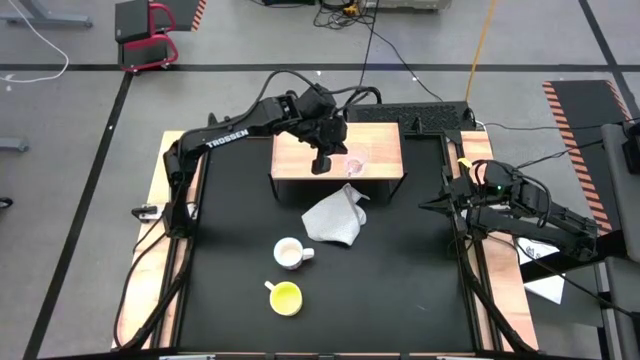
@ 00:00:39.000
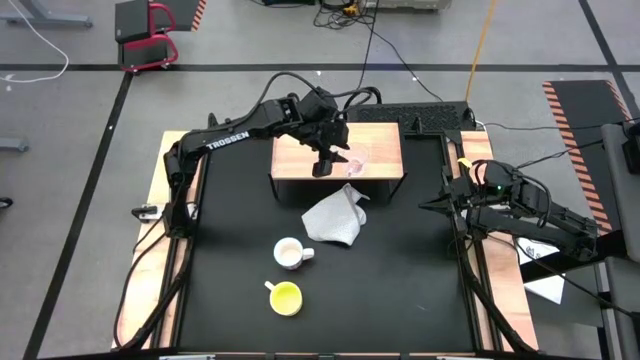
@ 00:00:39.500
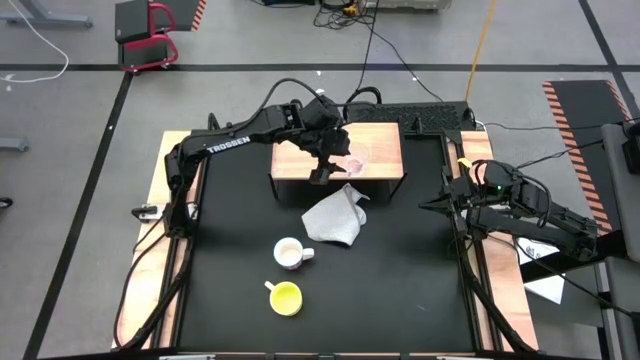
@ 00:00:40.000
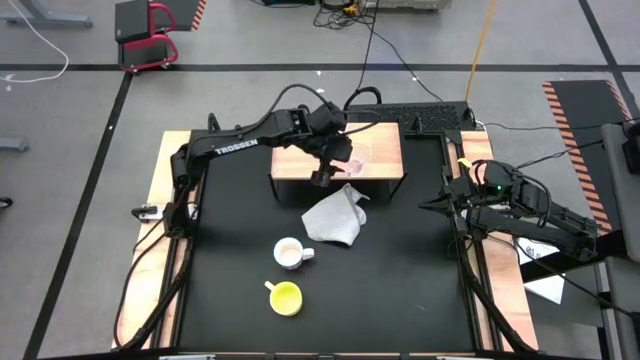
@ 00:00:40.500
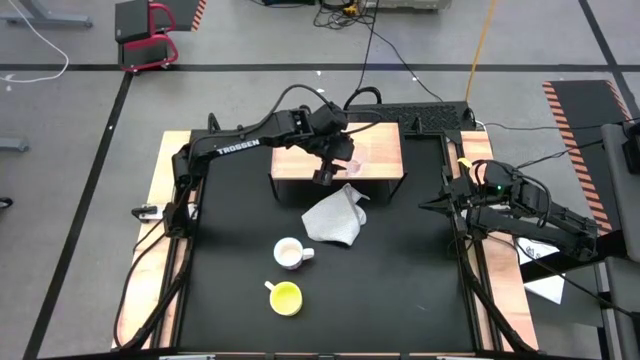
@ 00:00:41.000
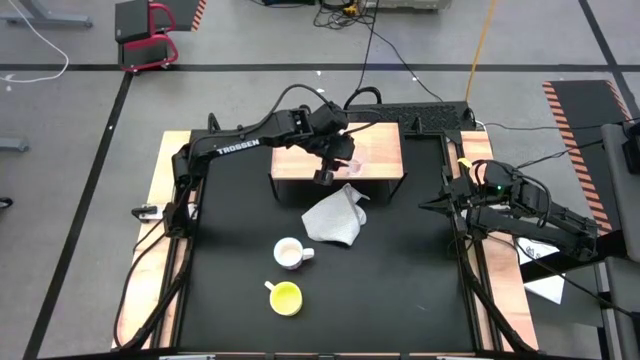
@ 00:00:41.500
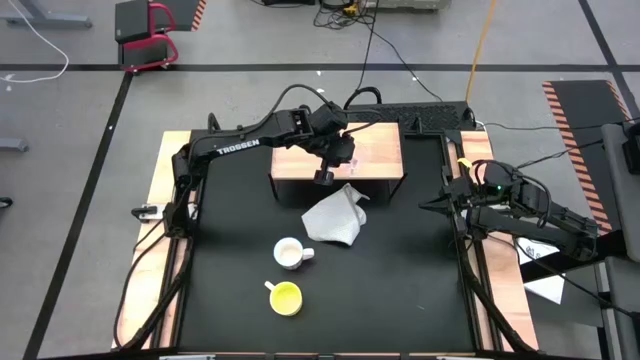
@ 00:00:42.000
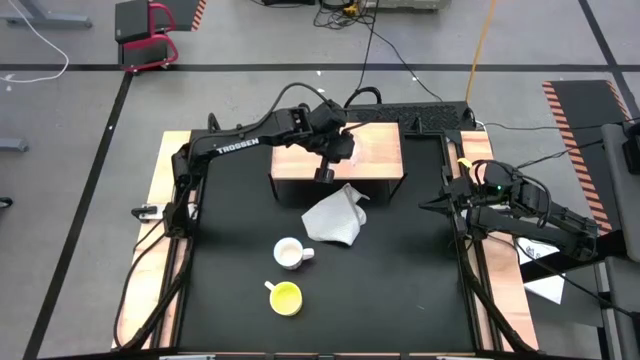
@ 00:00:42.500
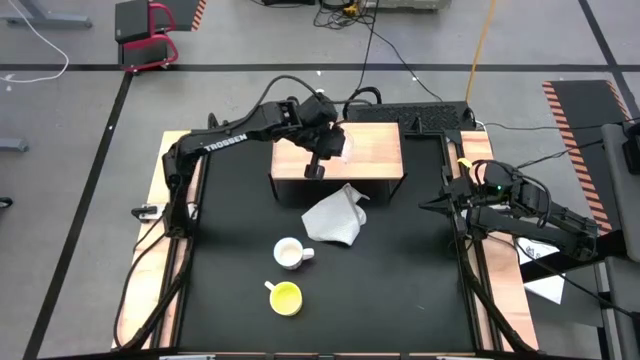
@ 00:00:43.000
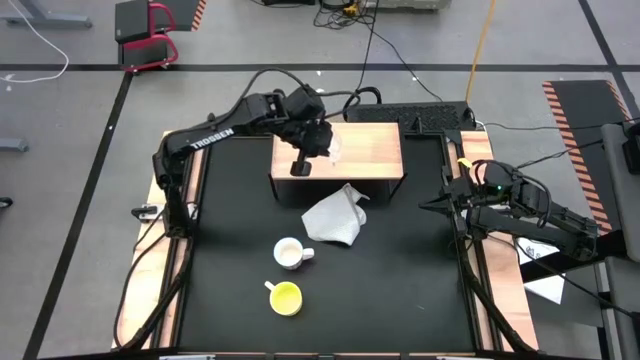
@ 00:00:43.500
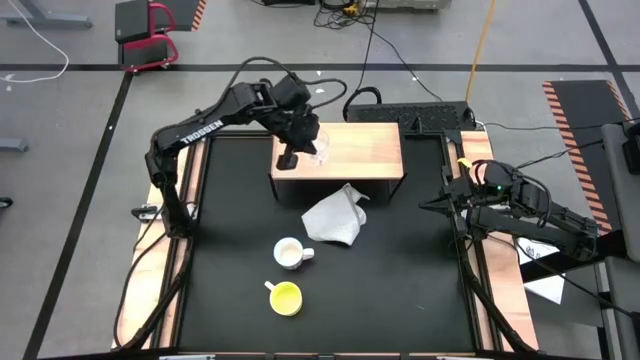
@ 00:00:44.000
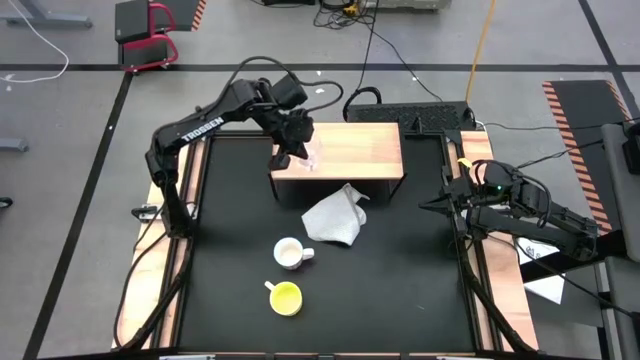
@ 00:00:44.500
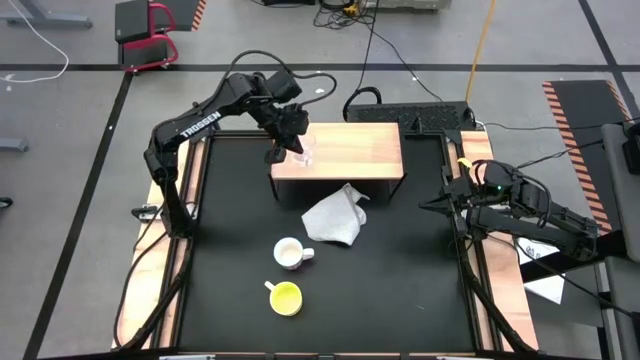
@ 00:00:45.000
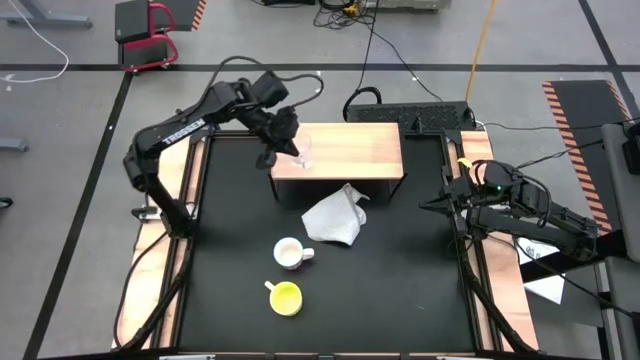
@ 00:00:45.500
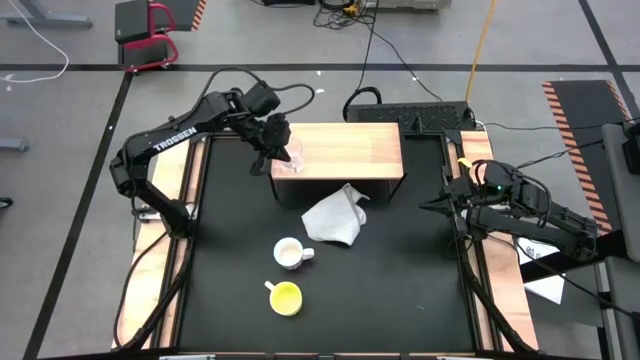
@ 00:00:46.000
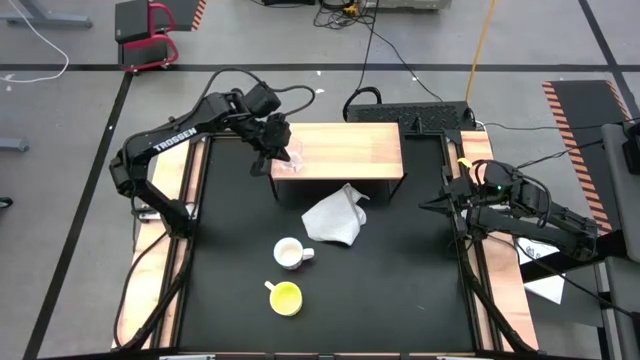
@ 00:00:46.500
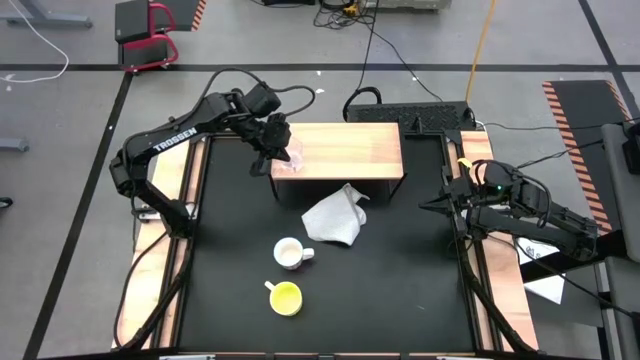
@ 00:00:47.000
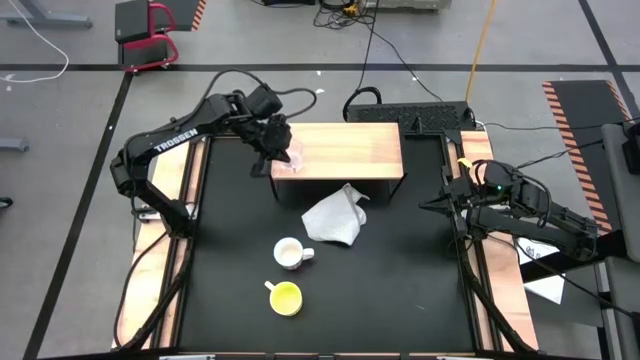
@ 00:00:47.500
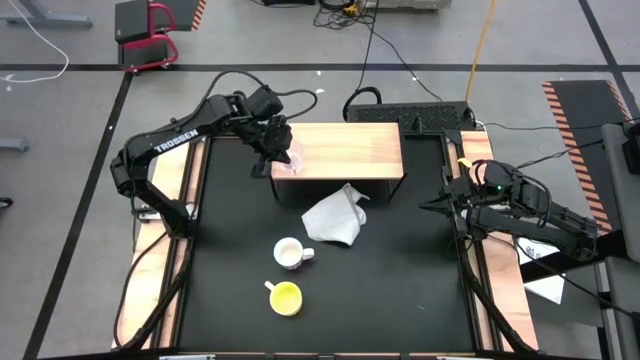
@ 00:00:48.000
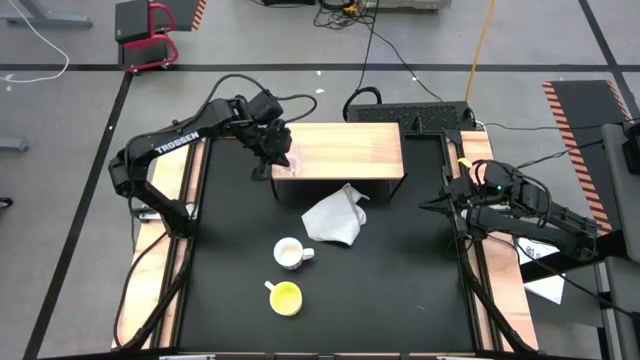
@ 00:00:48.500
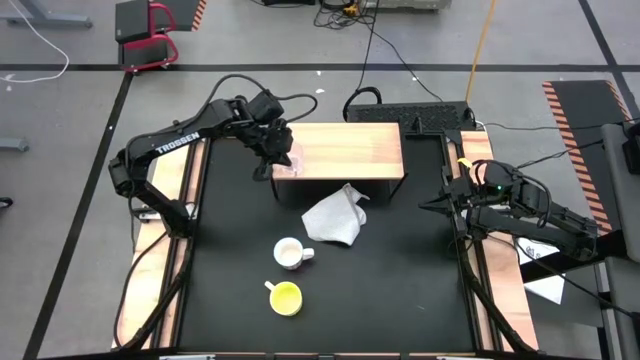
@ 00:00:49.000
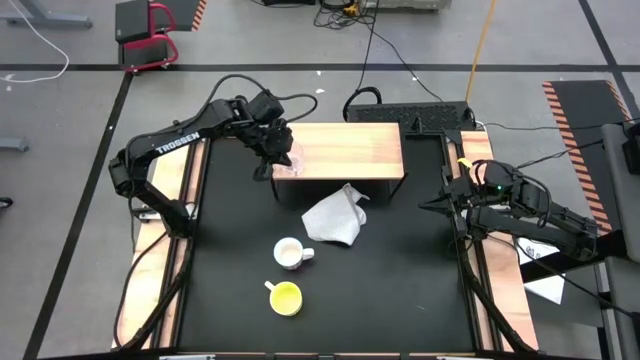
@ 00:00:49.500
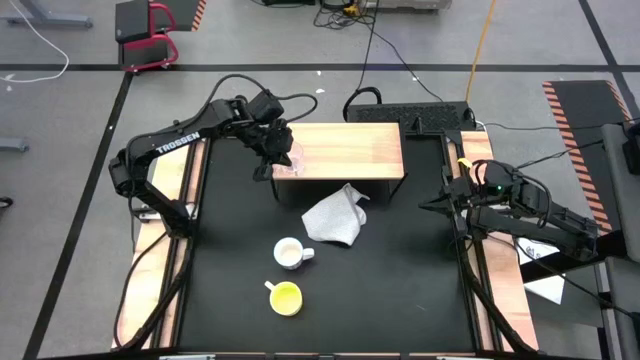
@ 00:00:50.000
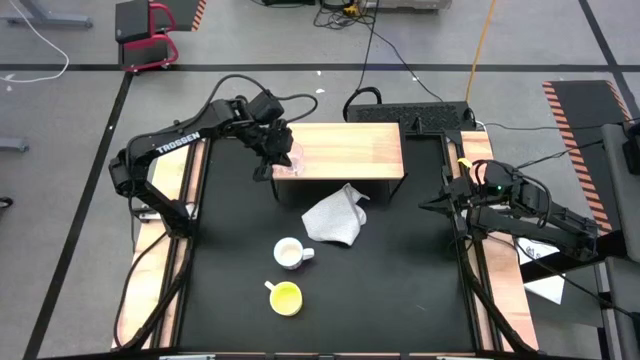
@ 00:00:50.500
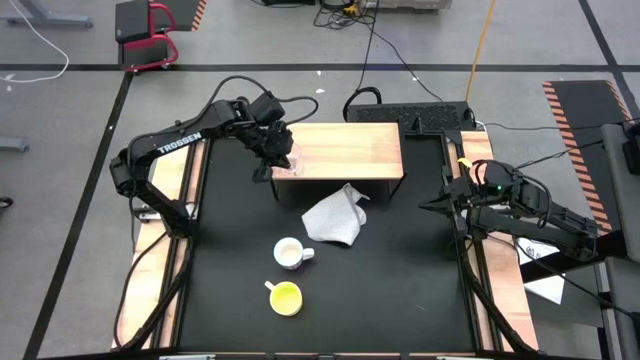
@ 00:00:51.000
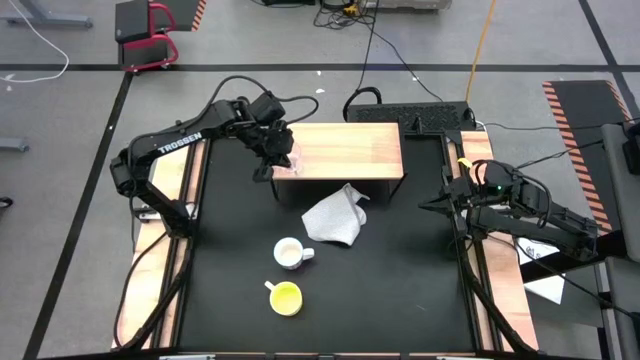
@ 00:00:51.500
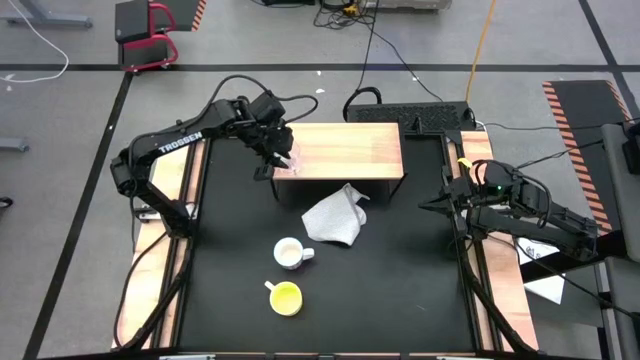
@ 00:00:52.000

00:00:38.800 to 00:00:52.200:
Task: Stack small to large cups/mugs on shelf
Adjust the transparent mug on the shelf

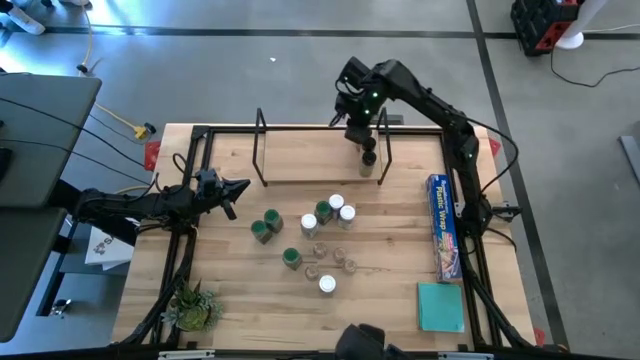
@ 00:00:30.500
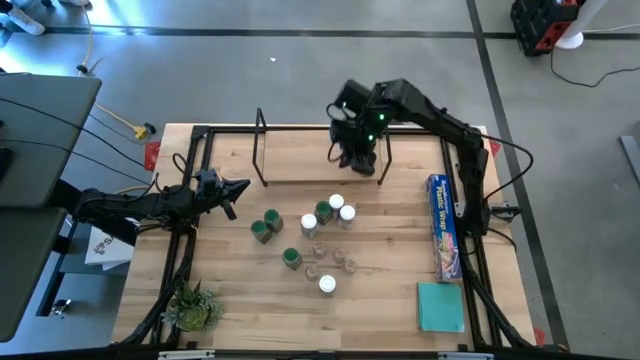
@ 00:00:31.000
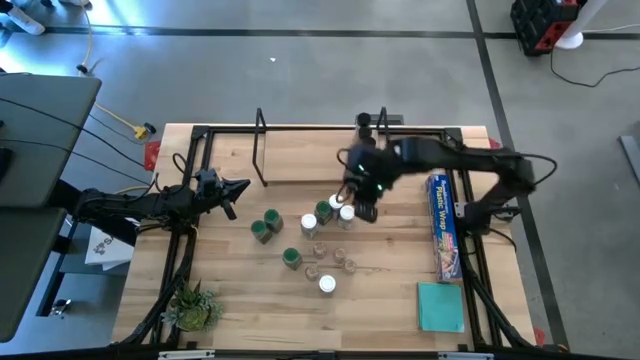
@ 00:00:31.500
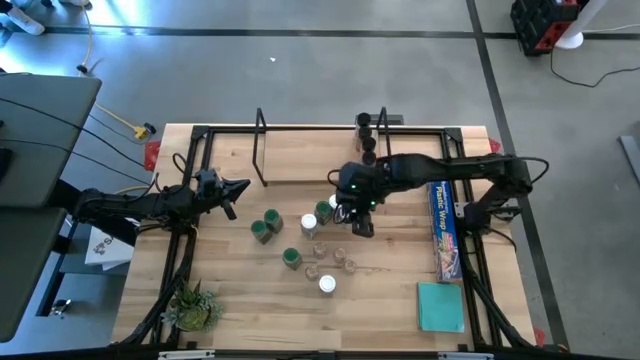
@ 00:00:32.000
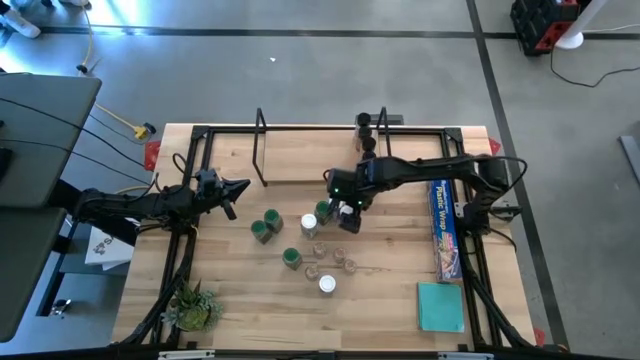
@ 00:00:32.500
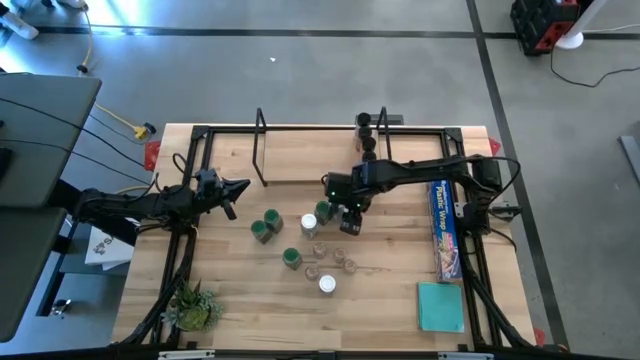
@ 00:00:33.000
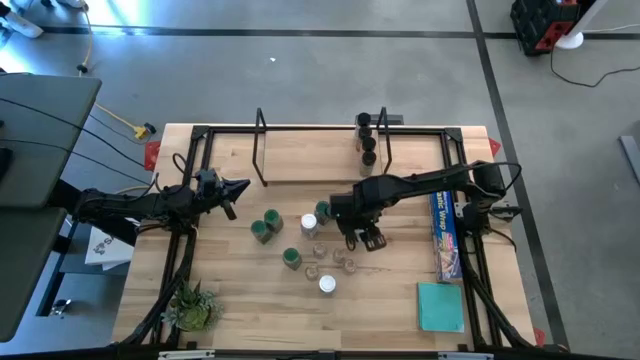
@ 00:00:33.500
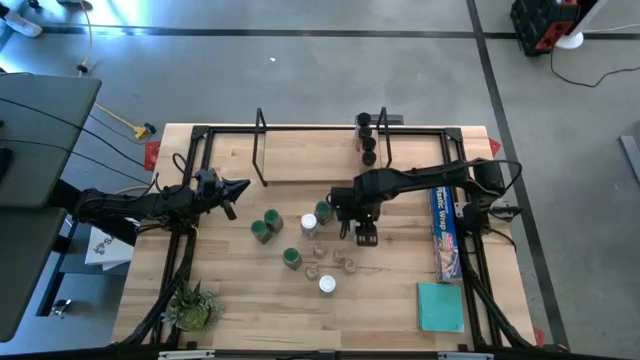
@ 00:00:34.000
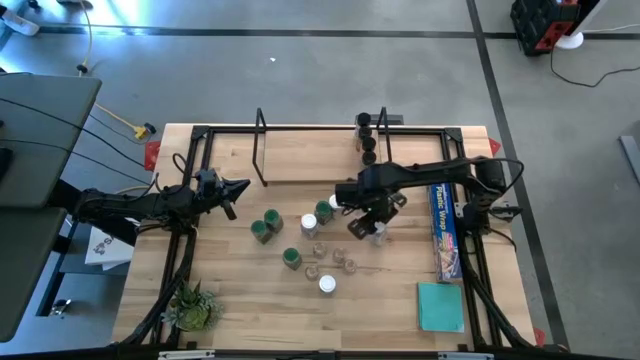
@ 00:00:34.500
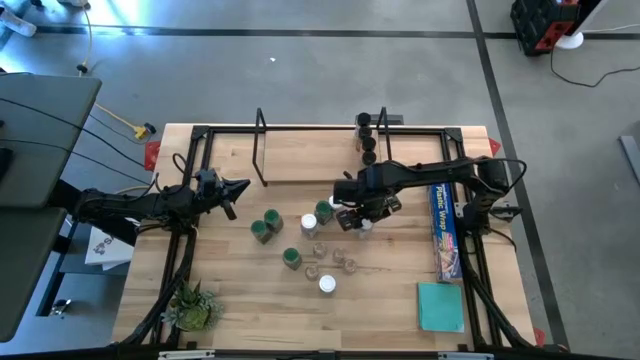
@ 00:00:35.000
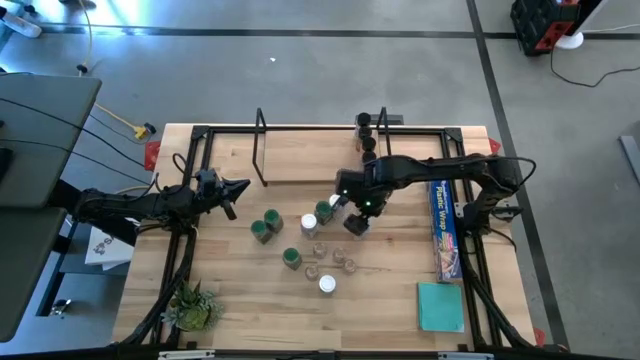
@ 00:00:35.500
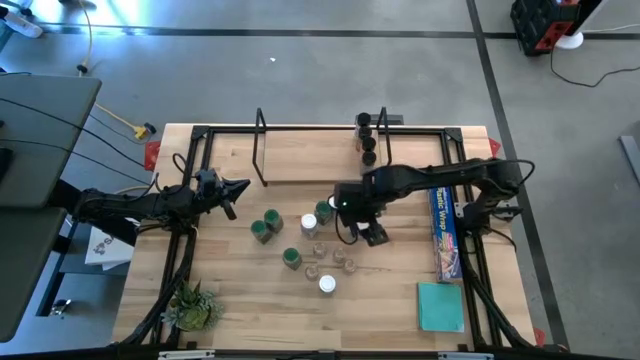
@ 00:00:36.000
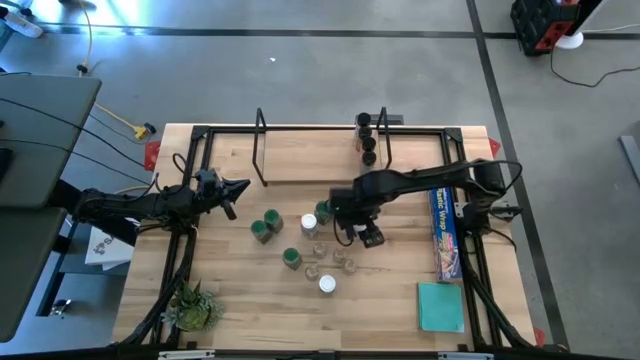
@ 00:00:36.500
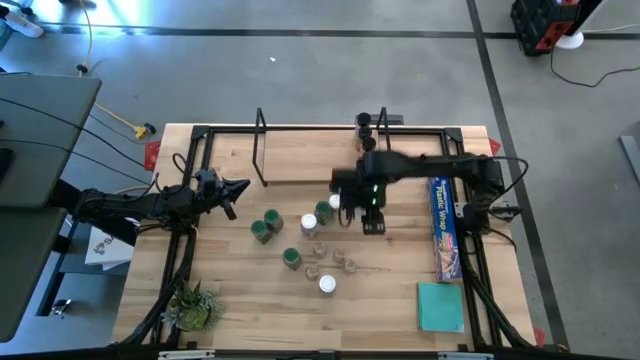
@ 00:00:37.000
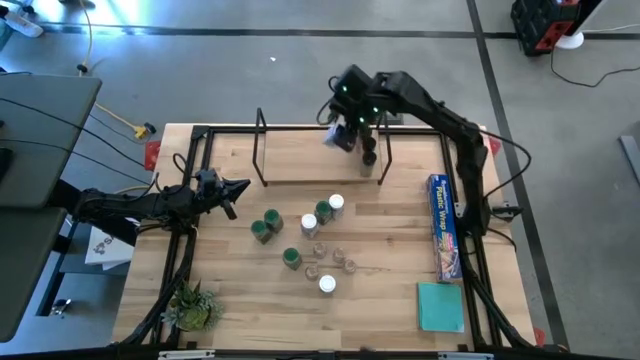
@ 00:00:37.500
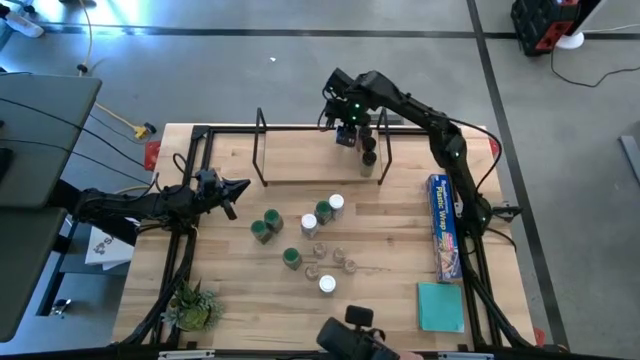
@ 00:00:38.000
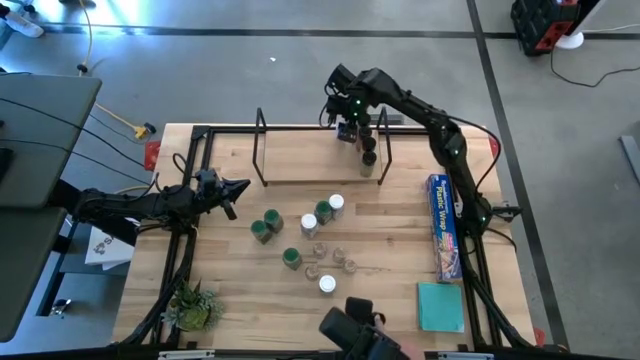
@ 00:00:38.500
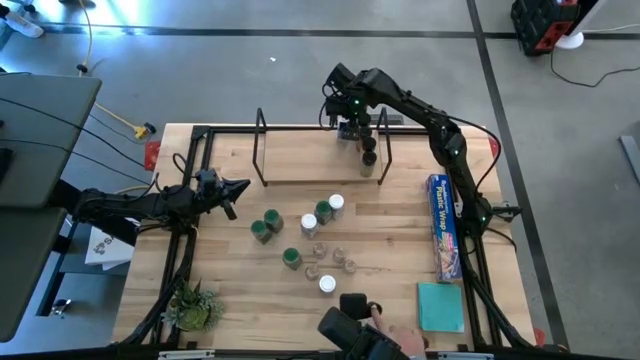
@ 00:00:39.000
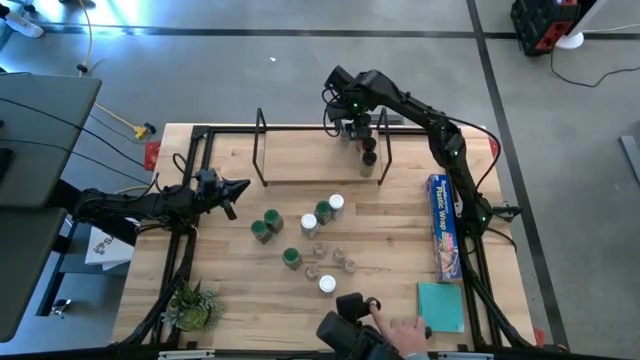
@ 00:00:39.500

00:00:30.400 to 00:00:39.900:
Task: Shelf spices
Put the middle right white seasoning bottle on the shelf
